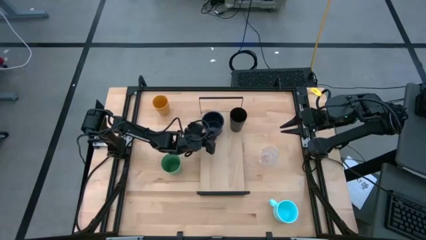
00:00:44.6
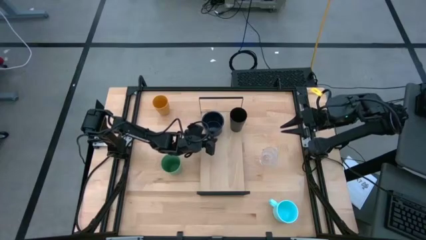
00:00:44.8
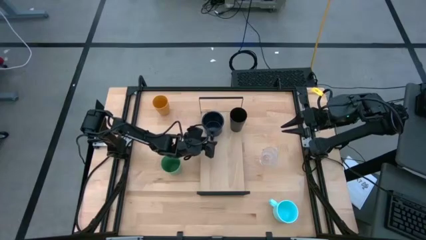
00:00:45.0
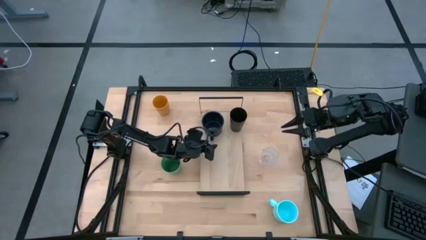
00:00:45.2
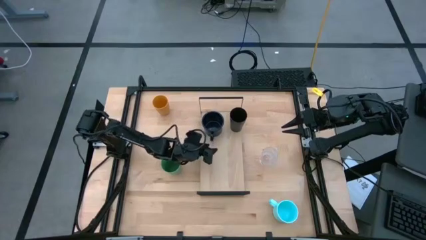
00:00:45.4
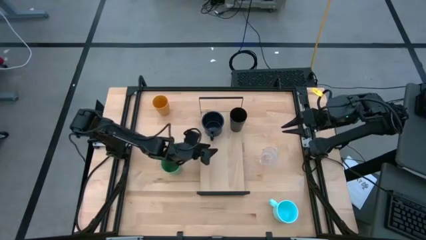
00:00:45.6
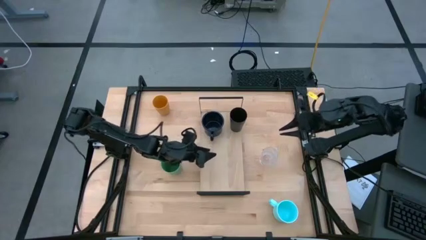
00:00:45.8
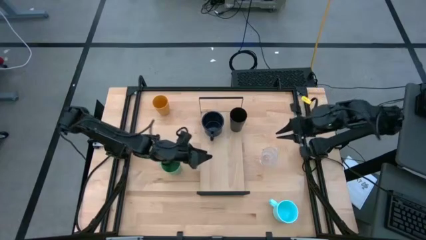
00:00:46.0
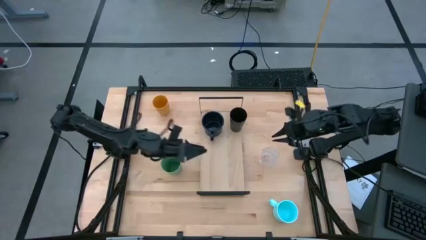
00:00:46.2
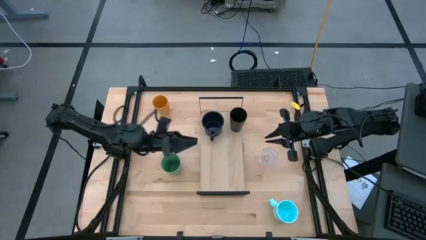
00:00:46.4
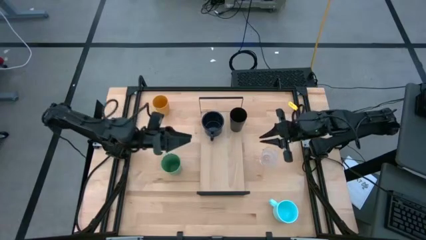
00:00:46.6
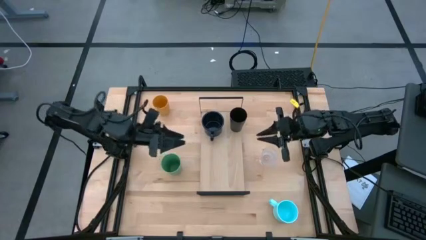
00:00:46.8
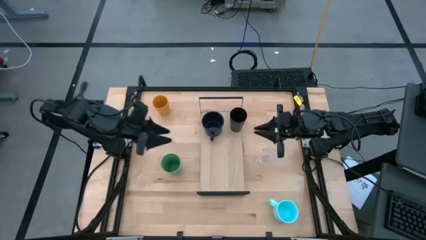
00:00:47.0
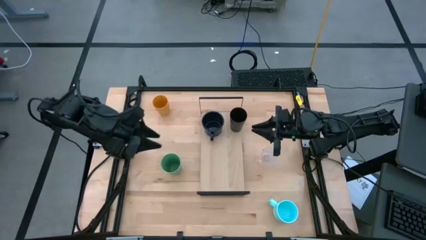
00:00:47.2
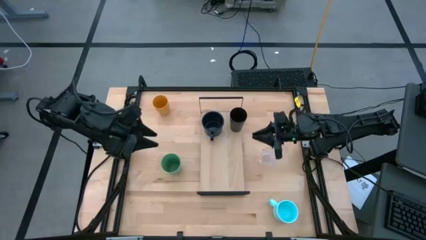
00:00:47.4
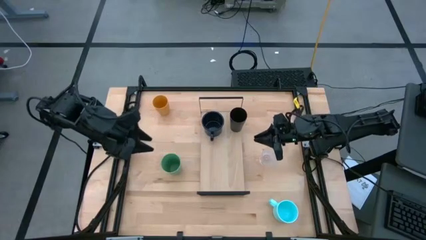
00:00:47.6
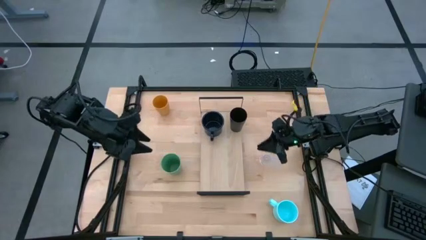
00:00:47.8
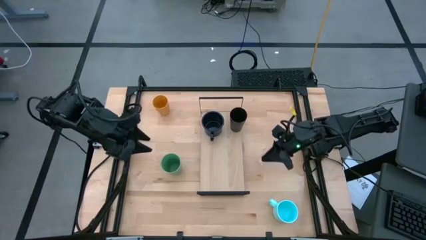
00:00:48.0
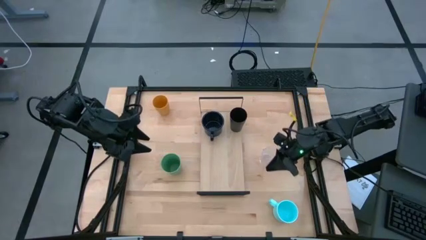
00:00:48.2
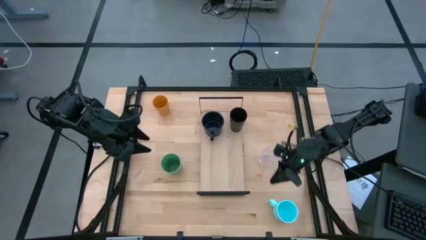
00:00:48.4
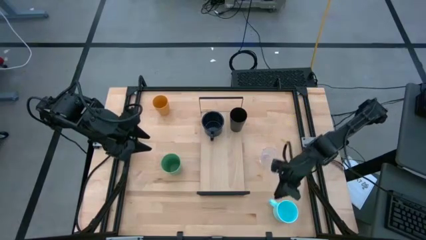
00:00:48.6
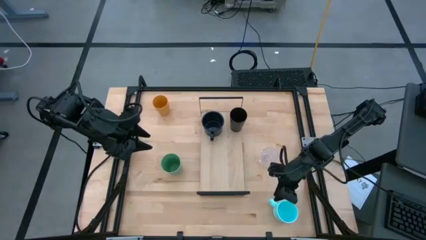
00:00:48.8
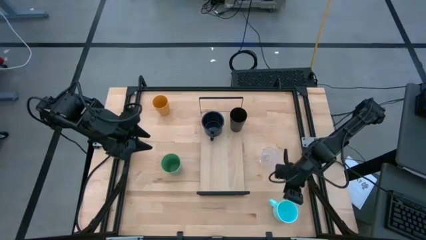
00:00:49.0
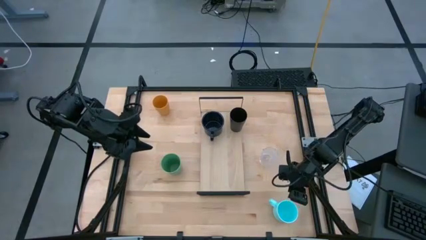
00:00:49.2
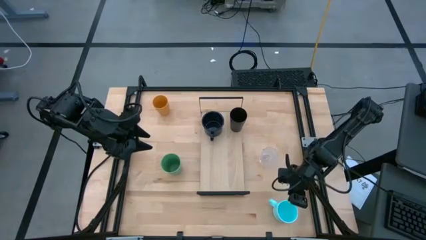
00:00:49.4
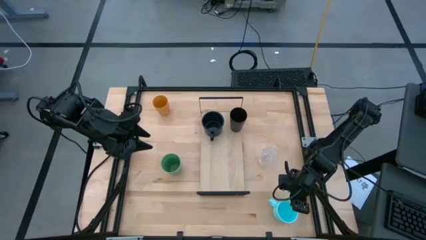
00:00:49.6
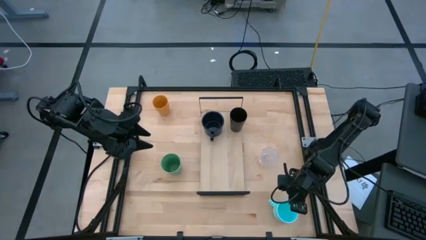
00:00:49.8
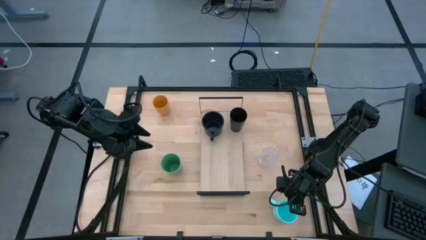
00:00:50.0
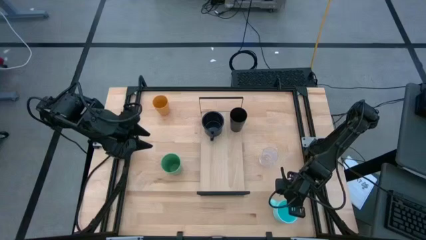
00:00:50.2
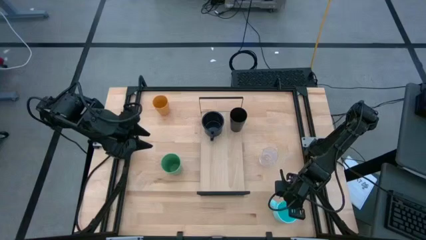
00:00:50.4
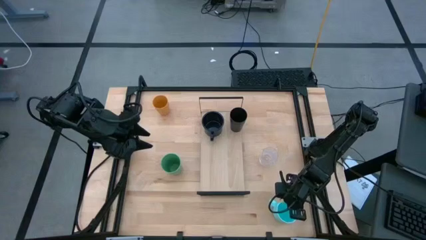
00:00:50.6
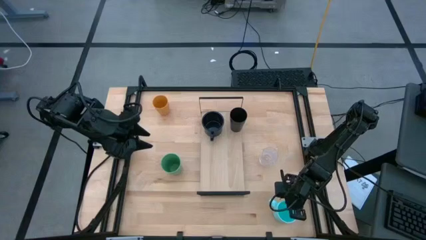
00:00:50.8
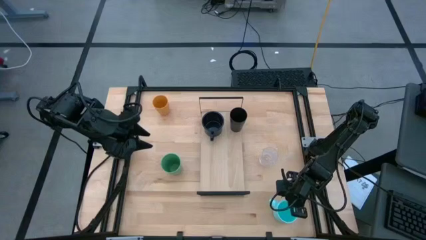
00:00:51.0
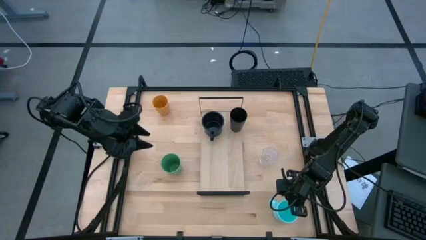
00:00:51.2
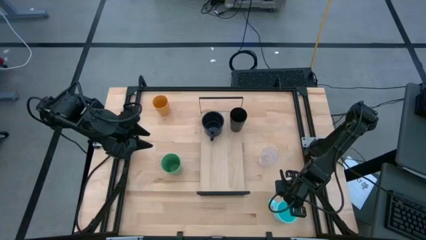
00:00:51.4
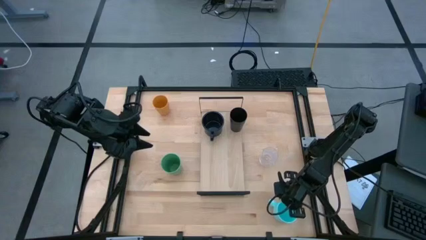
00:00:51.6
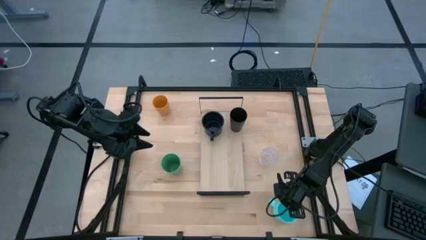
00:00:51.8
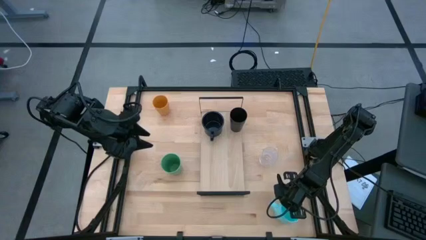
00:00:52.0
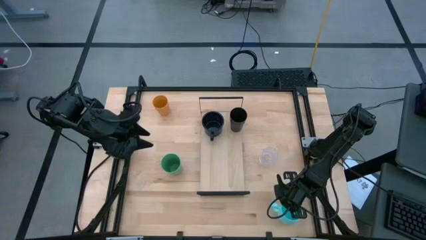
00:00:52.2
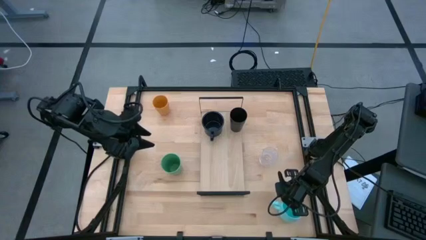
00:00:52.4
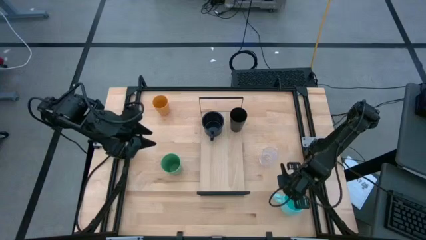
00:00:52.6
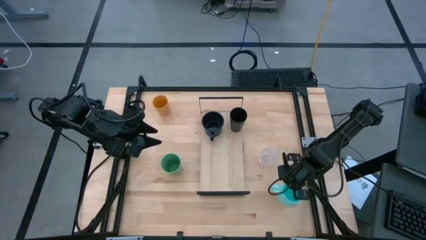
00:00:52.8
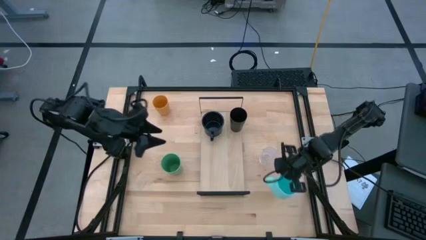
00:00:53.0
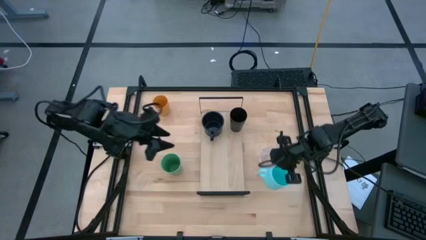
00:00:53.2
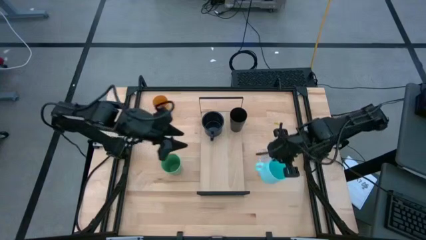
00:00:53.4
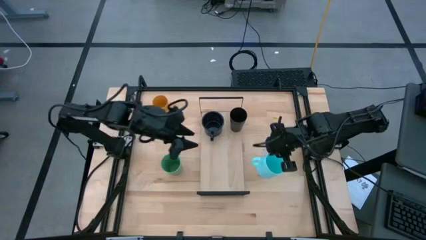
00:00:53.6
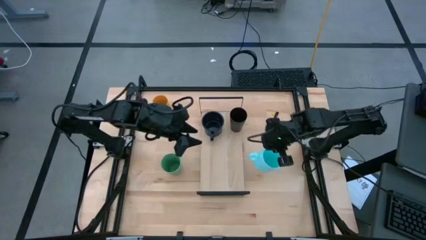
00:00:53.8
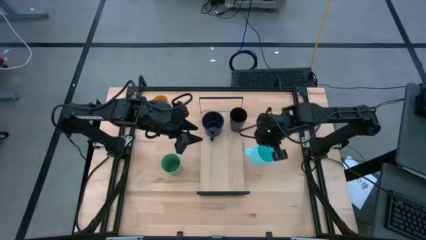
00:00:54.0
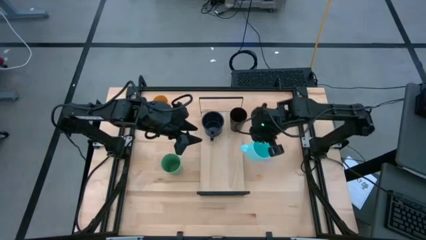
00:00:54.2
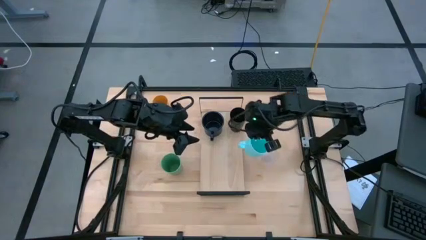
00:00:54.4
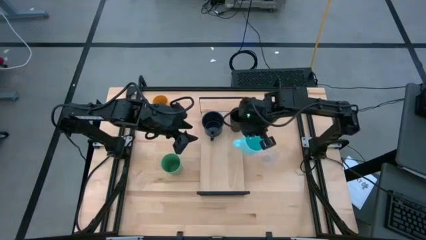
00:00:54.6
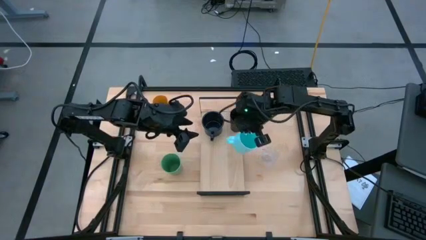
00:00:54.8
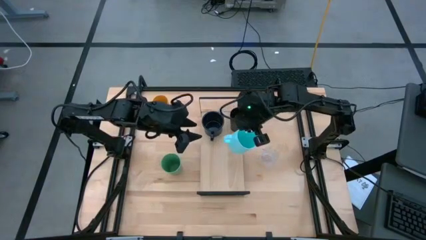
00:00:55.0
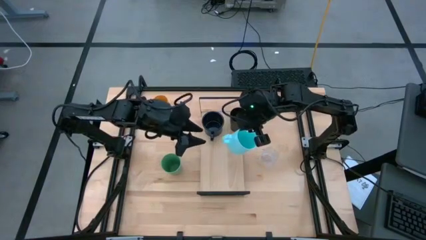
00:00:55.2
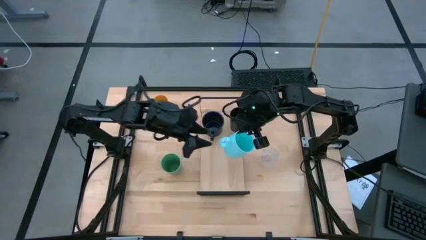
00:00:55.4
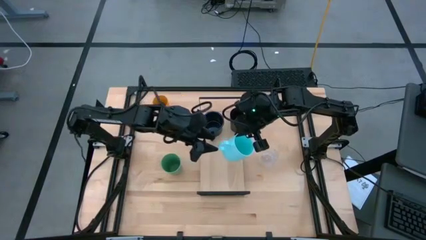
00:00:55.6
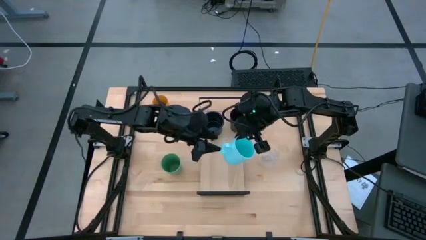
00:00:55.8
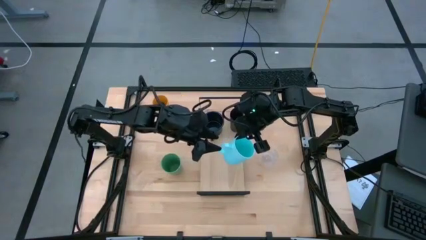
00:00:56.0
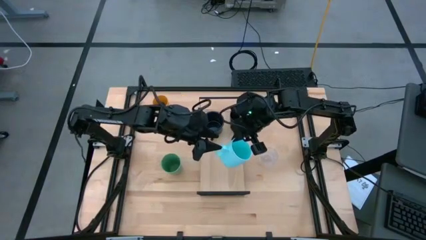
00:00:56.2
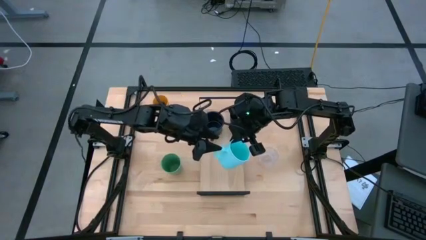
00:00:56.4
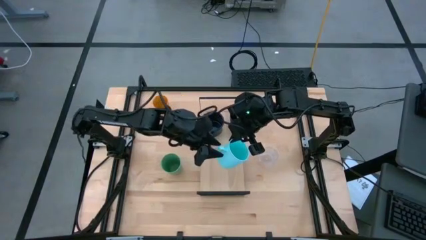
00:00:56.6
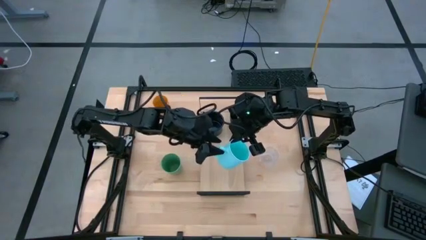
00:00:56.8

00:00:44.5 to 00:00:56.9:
Task: Stack small to large cups/mugs on shelf
Put the light blue mug on the shelf
